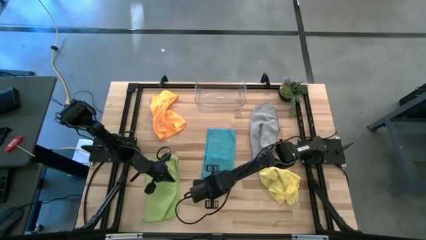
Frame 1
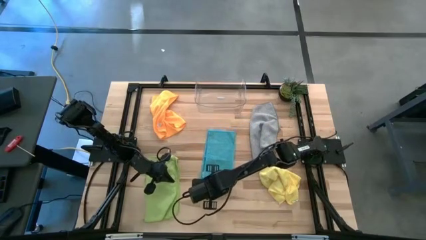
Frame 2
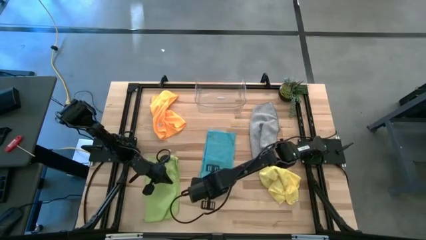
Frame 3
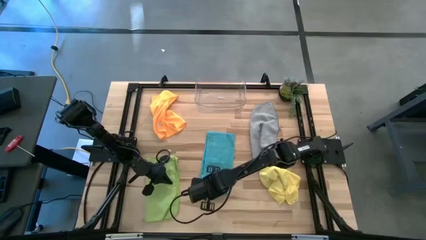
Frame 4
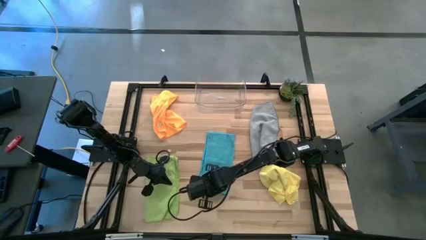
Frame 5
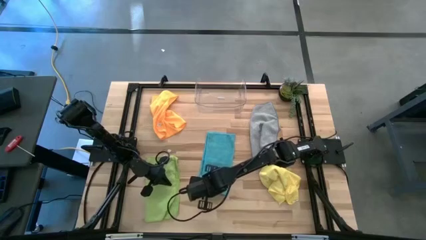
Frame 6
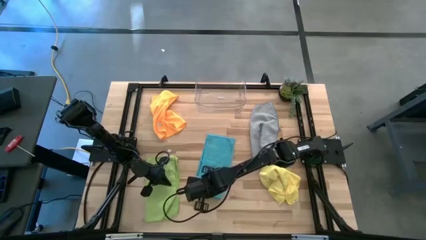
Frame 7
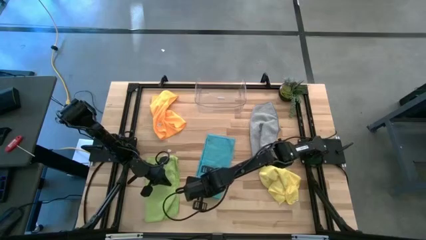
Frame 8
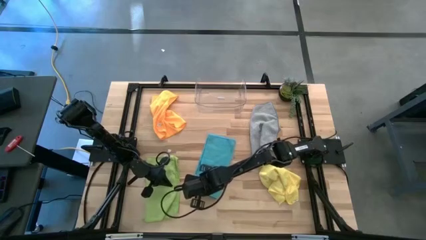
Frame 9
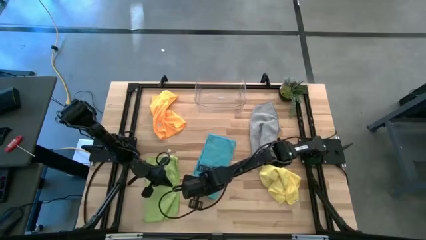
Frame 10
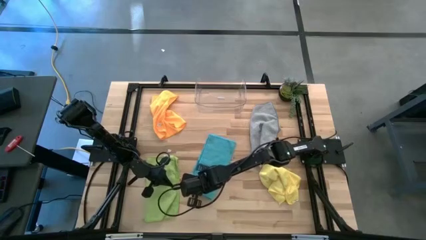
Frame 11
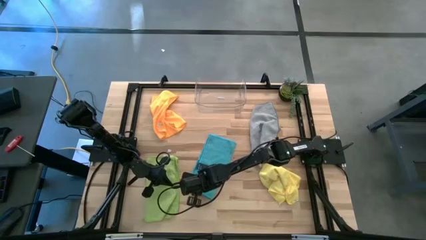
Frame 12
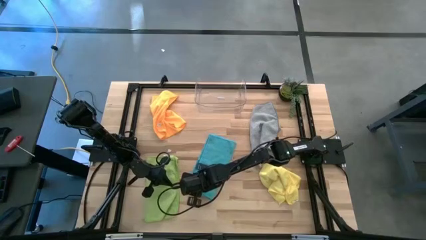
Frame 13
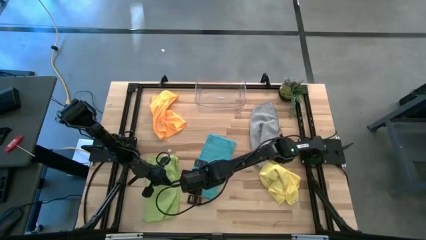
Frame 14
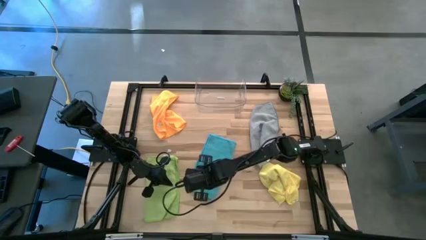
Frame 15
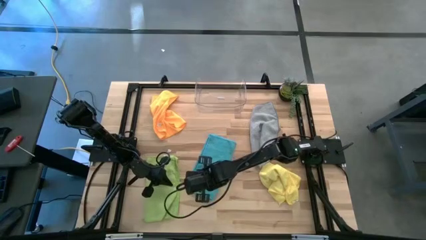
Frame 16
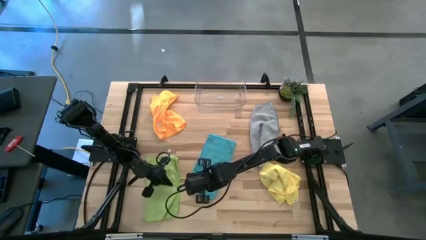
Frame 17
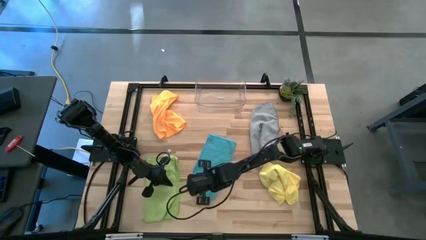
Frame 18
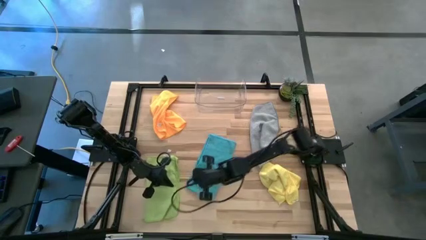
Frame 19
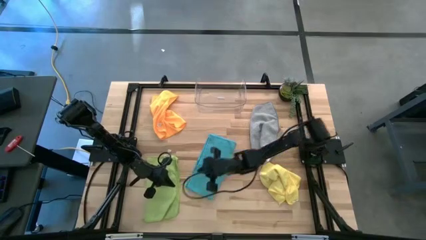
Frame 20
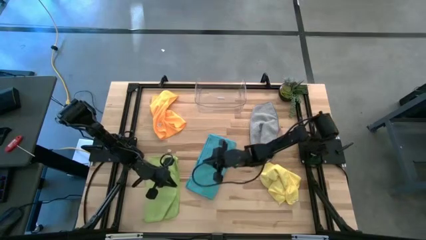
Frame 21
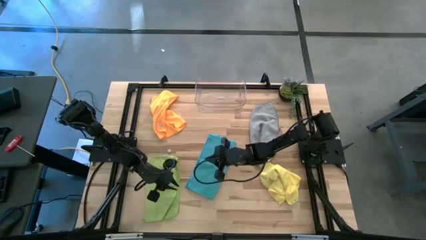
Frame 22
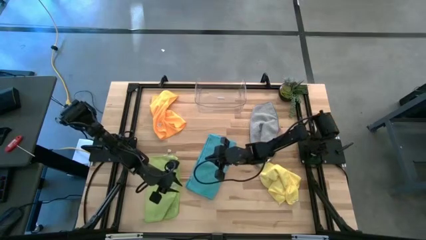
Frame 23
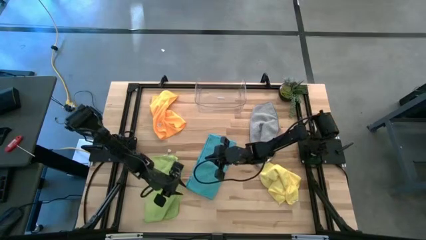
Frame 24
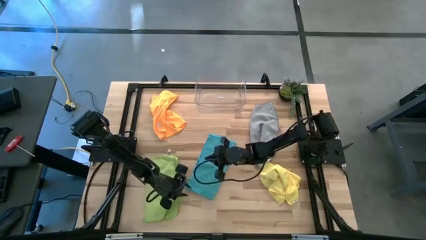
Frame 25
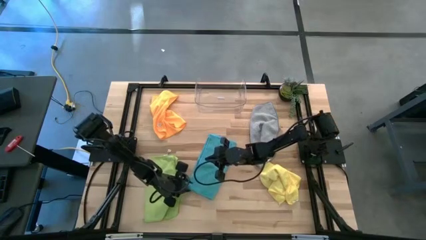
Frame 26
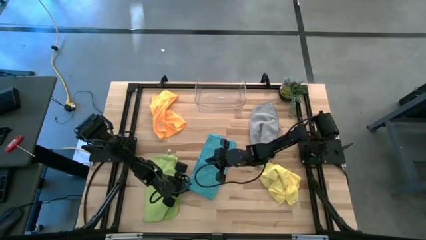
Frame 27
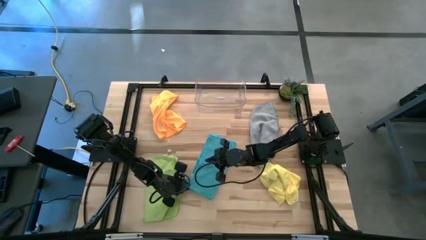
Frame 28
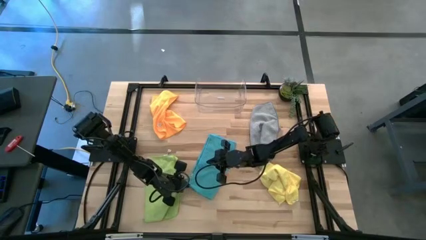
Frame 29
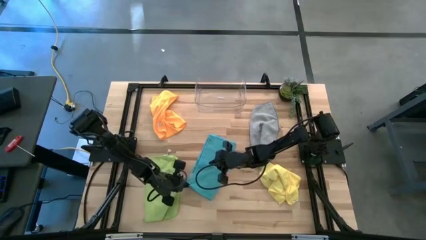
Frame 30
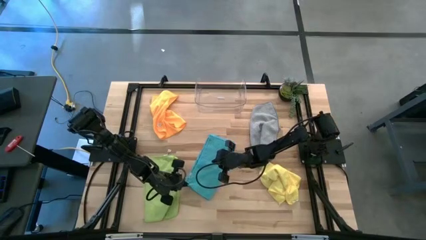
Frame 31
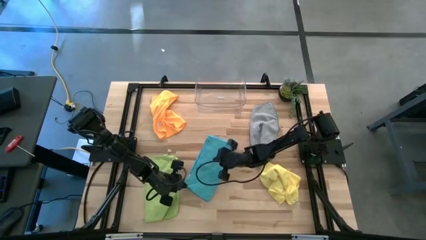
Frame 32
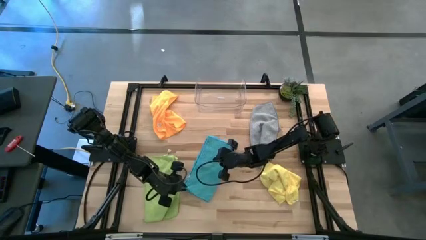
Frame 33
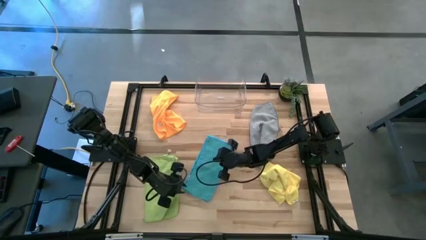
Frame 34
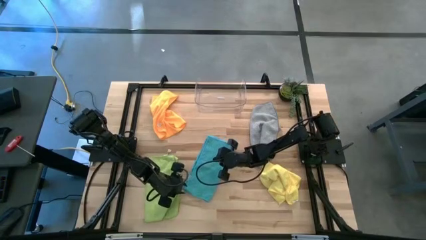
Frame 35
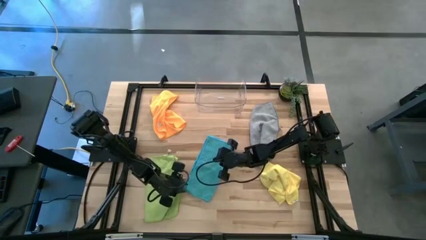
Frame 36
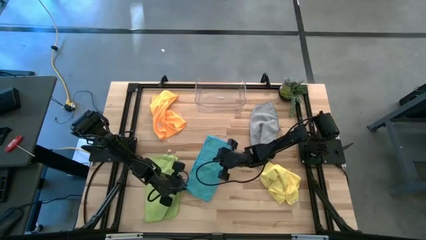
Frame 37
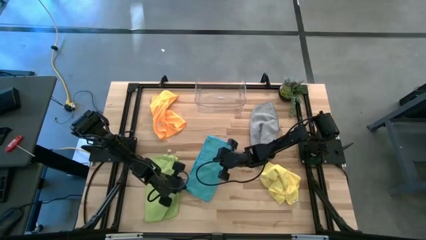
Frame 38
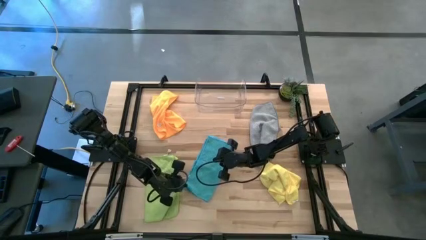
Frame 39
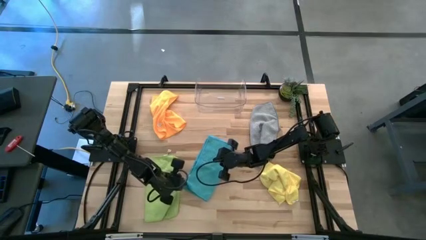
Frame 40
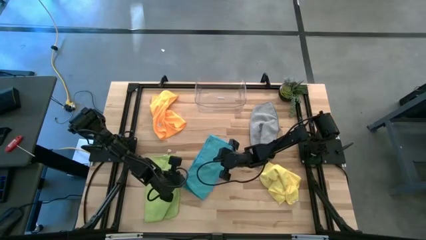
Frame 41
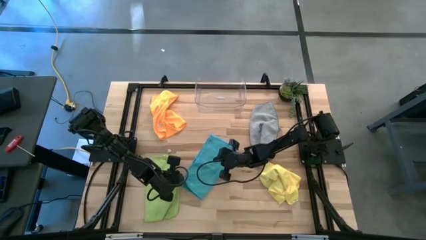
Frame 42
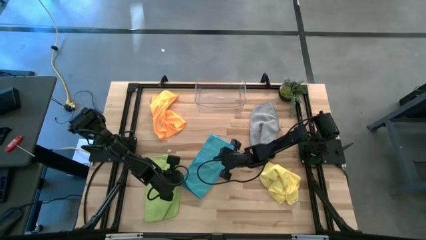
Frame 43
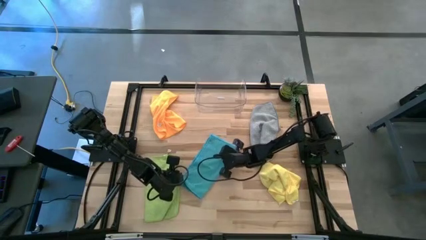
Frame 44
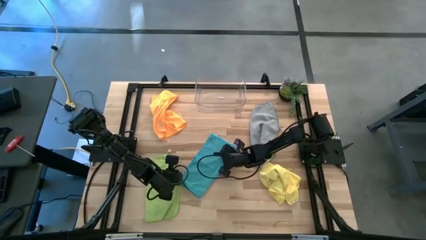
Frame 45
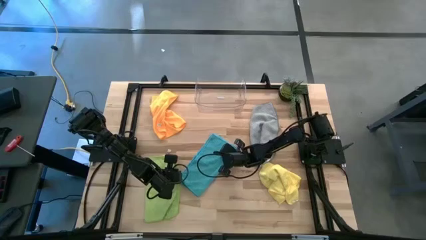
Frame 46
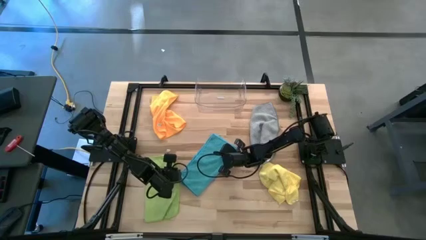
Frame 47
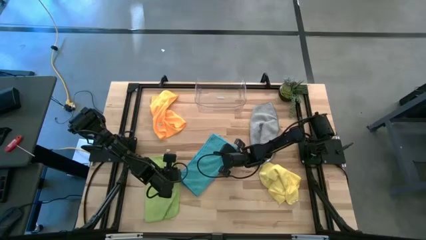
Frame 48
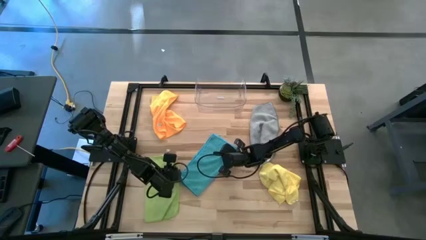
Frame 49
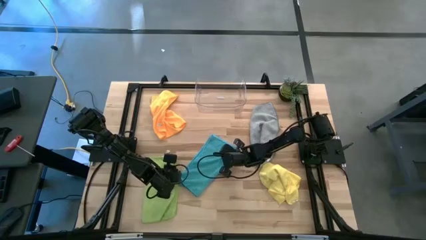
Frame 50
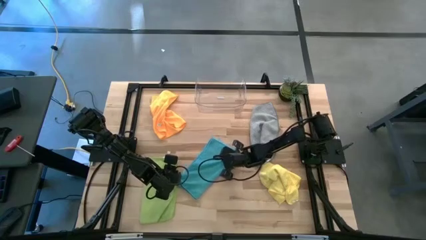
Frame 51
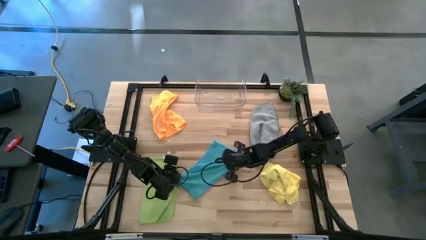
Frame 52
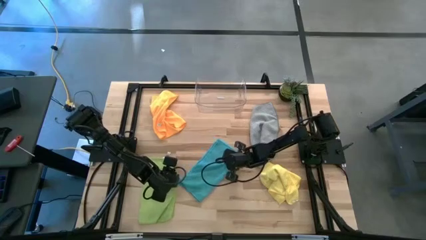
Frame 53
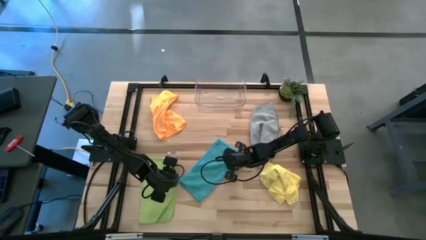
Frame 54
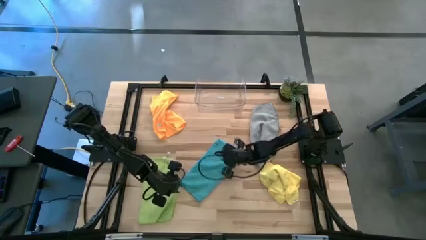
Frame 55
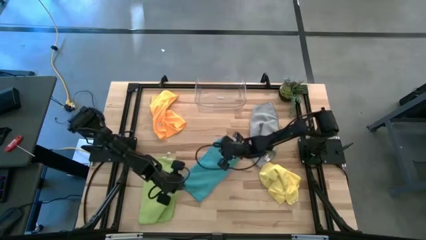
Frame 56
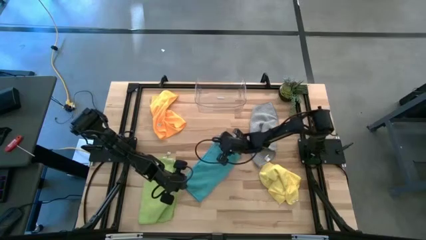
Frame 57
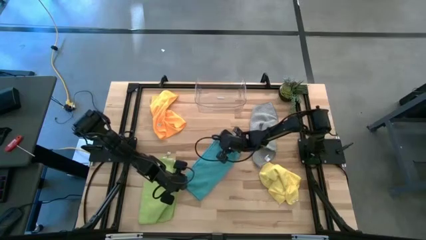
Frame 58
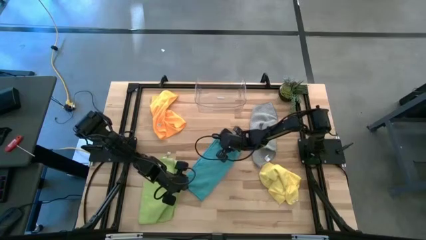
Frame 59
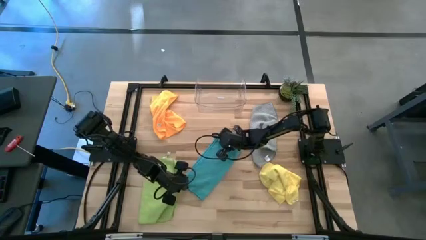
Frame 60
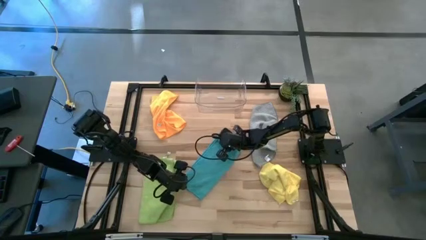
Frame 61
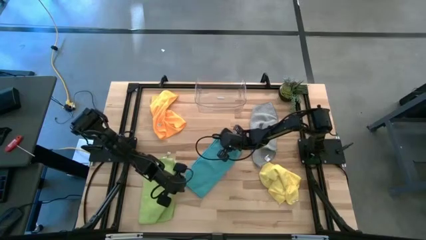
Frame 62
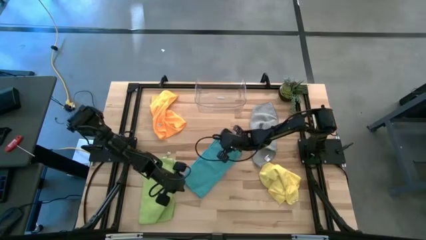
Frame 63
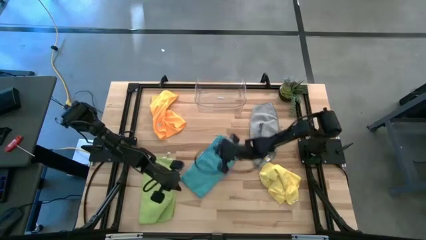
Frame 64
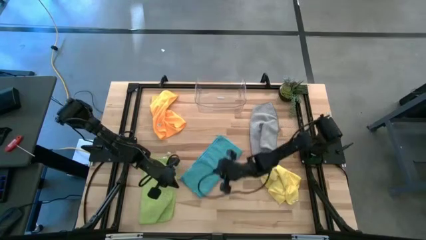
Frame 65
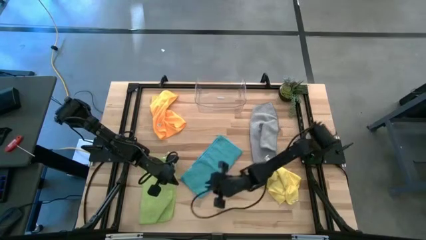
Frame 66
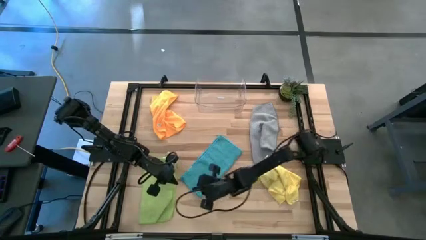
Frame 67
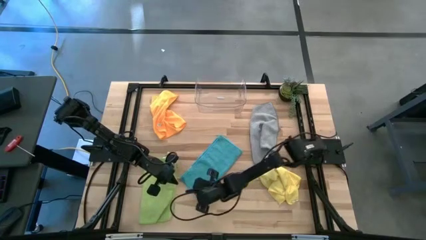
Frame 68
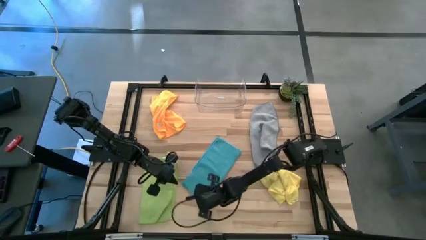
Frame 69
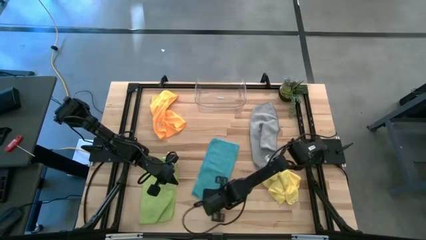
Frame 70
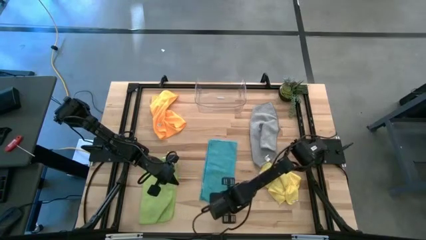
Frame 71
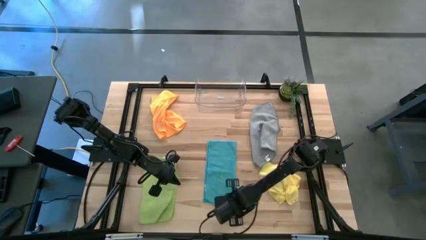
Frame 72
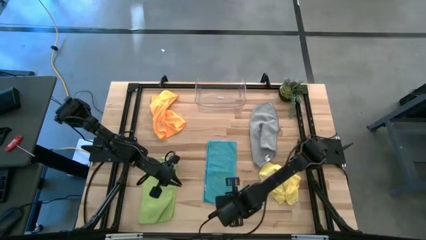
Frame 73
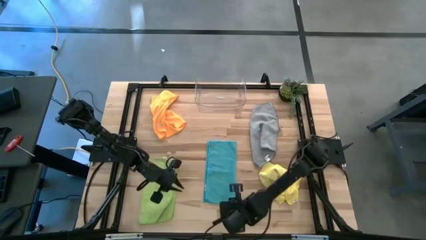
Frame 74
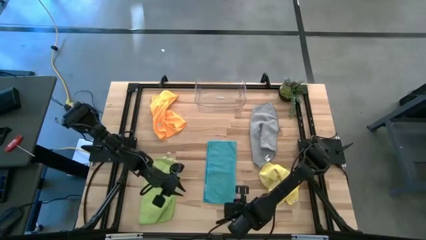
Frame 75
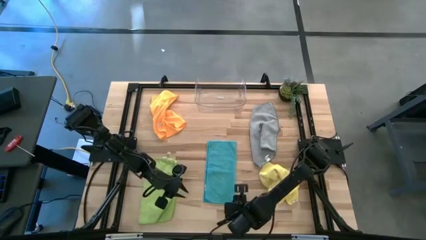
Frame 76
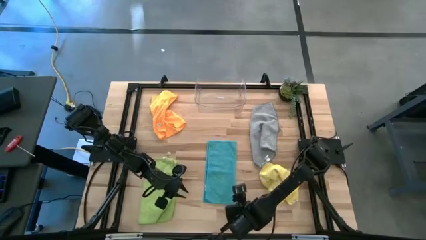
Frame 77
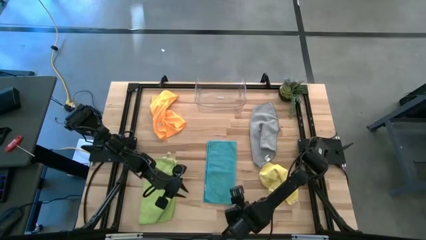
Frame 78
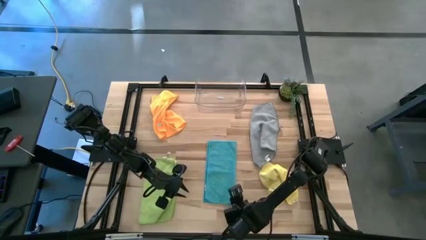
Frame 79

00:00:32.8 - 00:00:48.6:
Task: Fold microfiber towels
Fold the blue towel on the table
